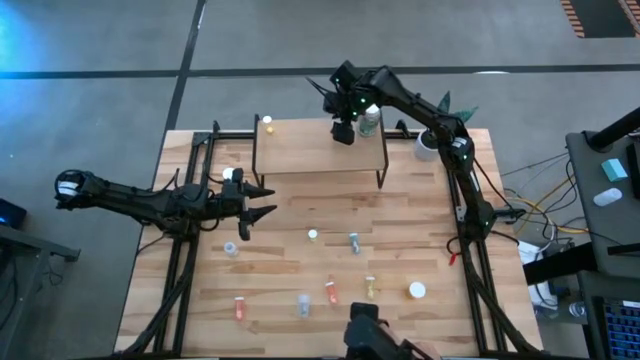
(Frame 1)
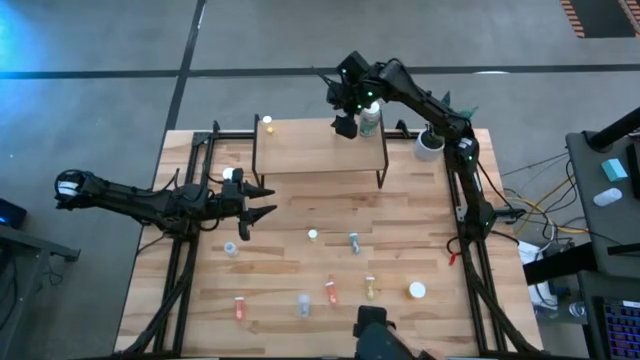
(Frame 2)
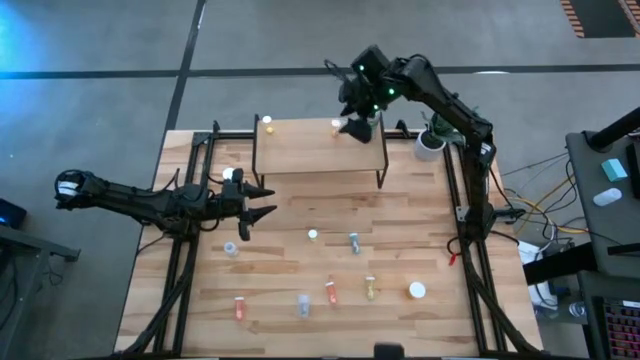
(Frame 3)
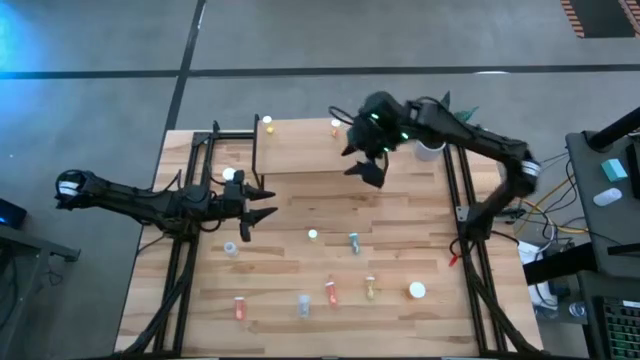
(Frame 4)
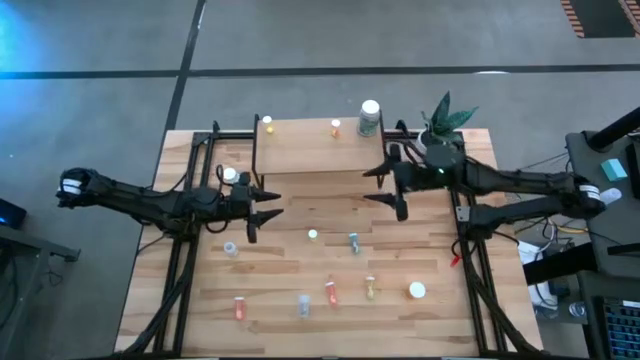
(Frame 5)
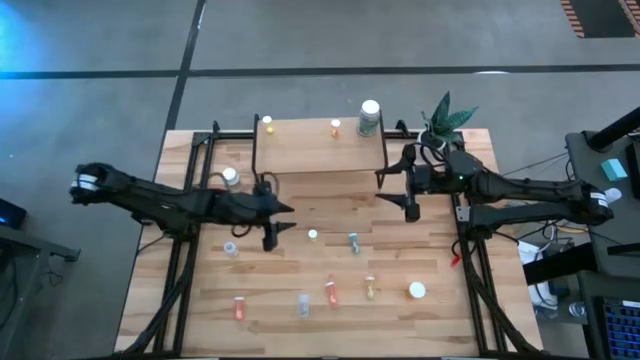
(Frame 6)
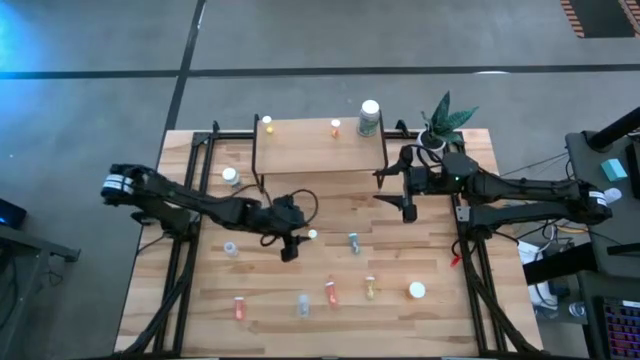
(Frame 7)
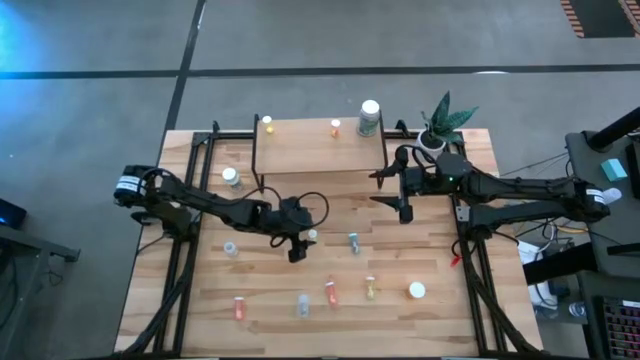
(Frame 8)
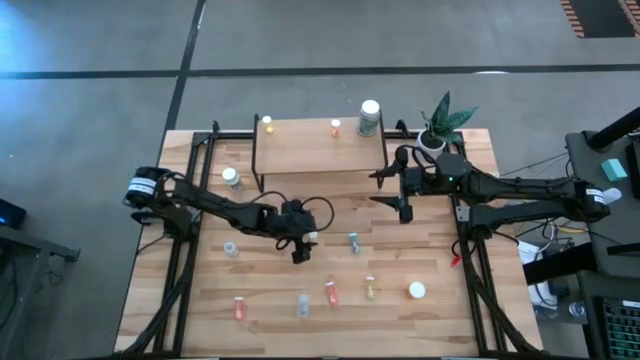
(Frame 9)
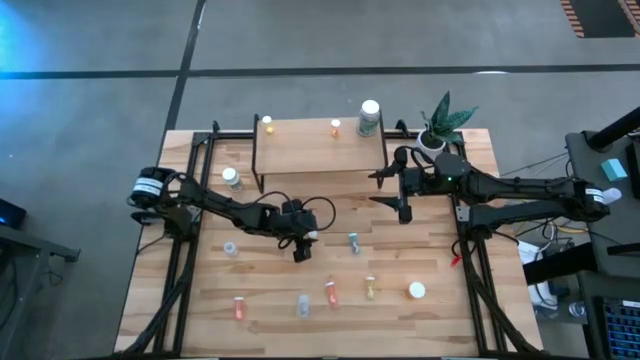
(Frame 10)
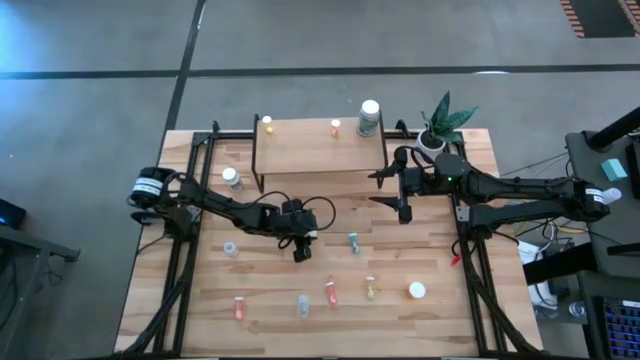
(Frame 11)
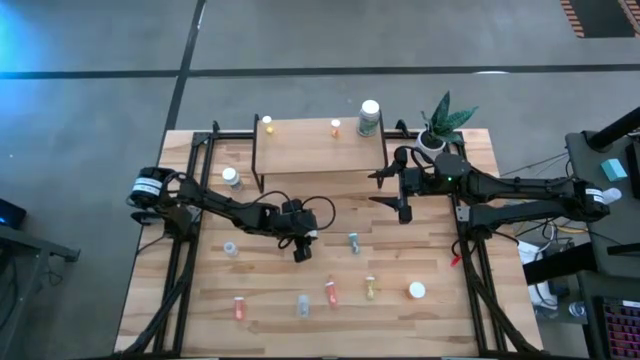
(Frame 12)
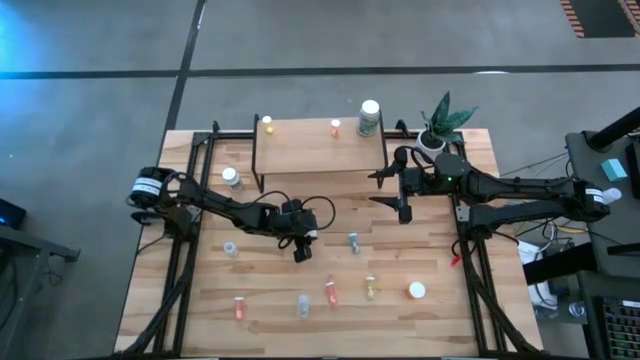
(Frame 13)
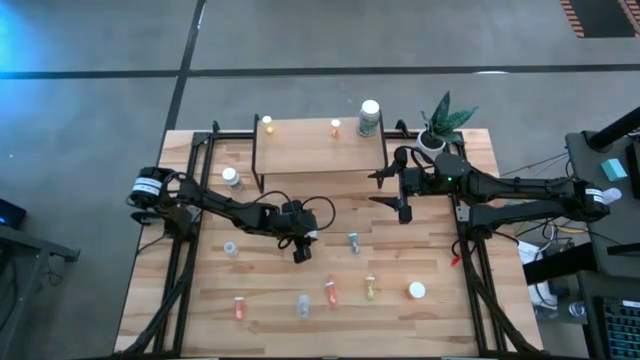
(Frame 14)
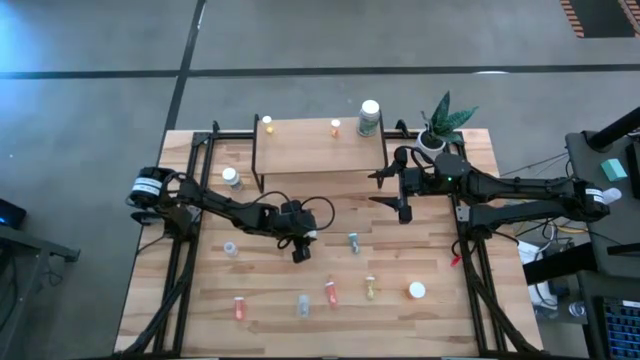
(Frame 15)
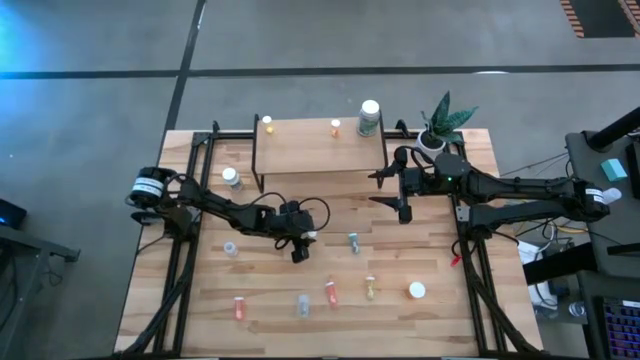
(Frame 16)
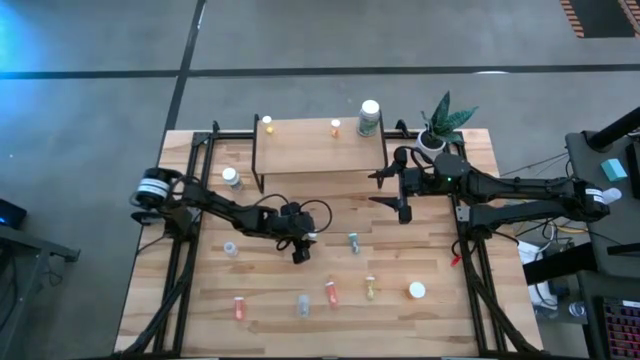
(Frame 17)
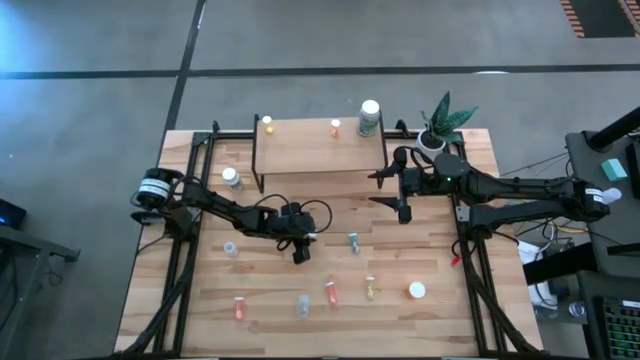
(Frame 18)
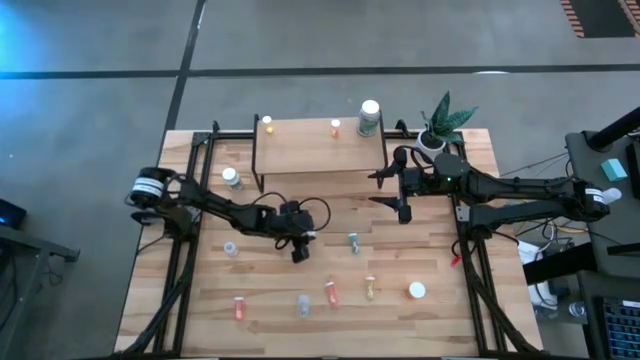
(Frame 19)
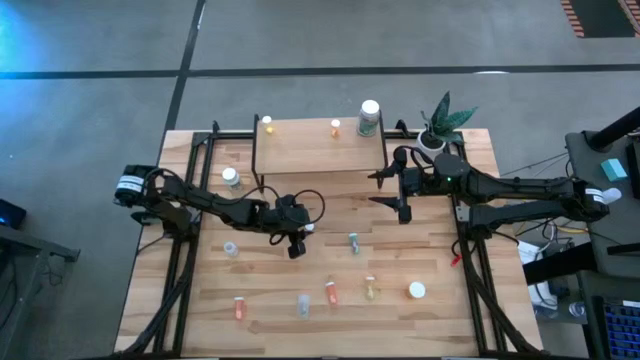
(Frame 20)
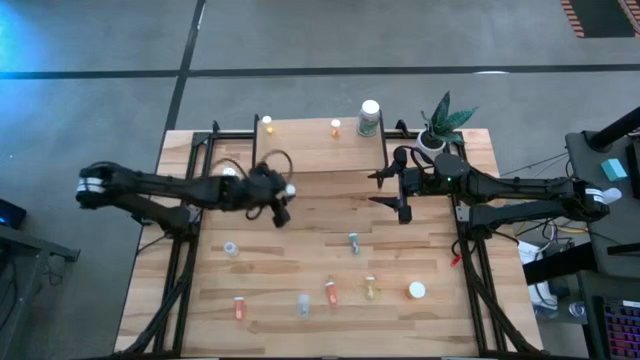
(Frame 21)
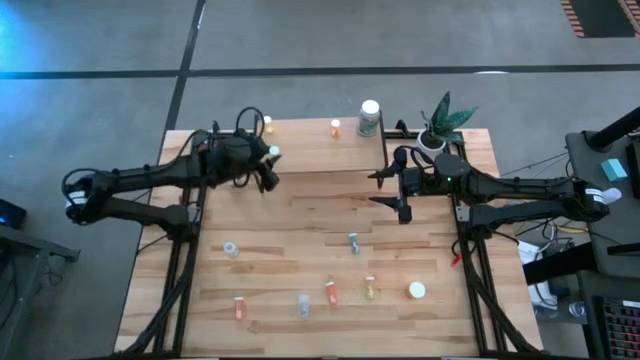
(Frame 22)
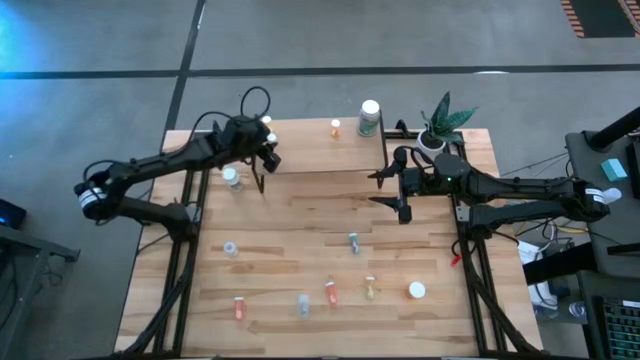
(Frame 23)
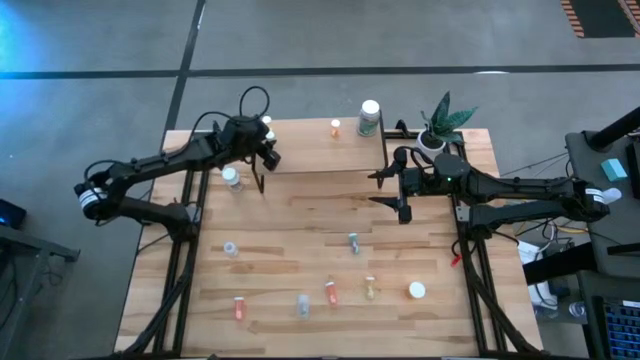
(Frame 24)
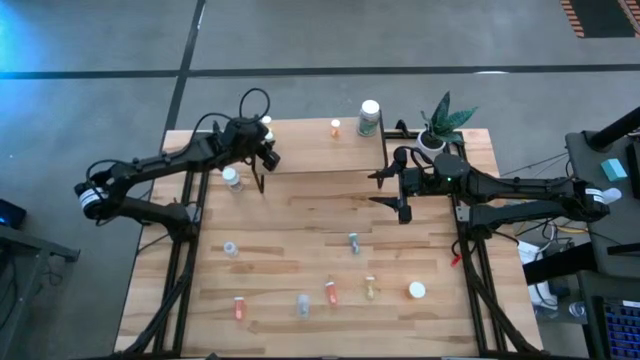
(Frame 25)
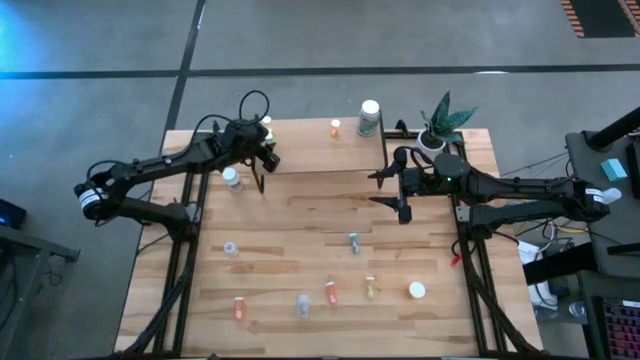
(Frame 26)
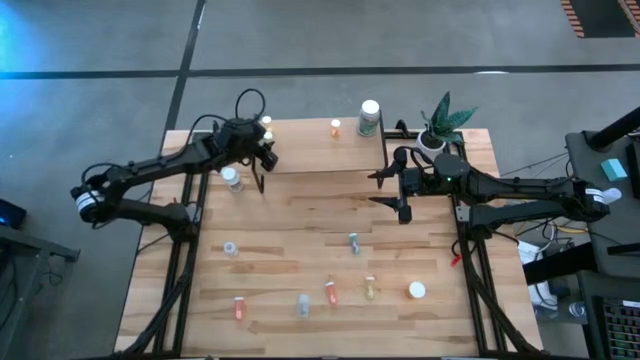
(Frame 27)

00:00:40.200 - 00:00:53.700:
Task: Pick and place medicine bottles onto shelf by color
Put the yellow pill bottle on the shelf

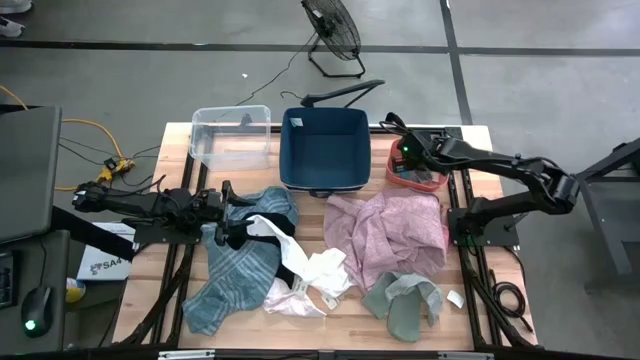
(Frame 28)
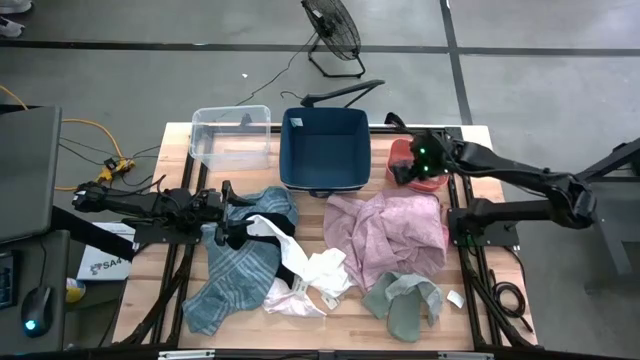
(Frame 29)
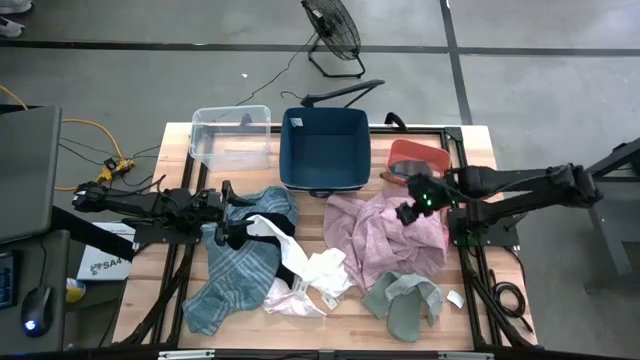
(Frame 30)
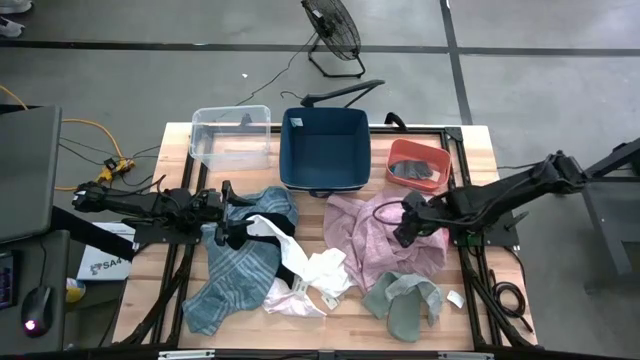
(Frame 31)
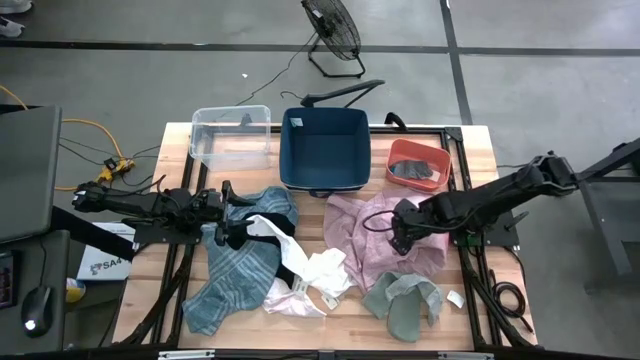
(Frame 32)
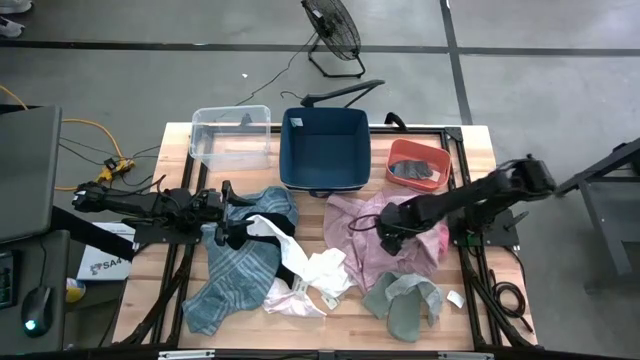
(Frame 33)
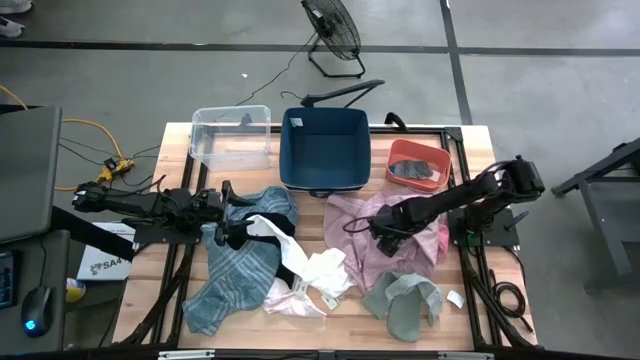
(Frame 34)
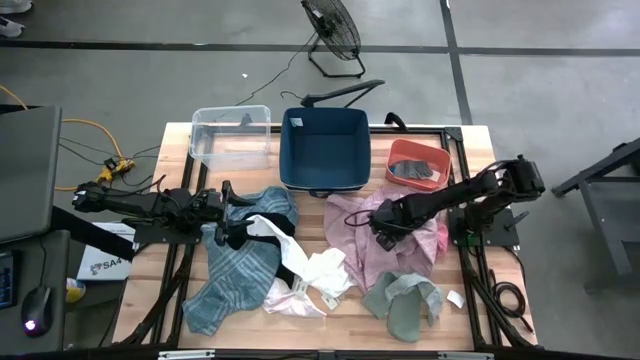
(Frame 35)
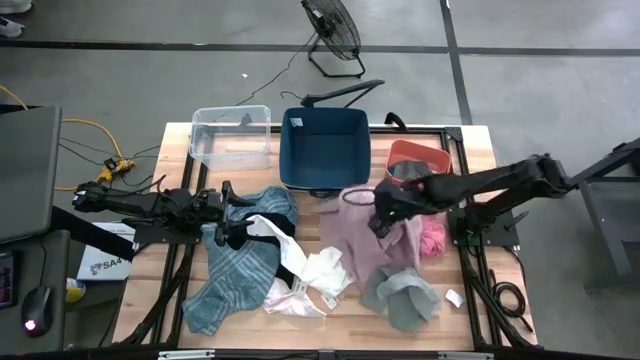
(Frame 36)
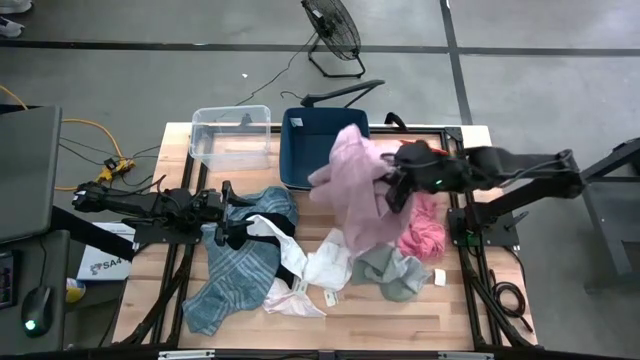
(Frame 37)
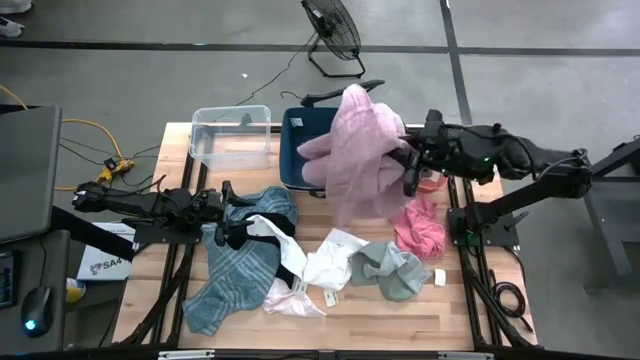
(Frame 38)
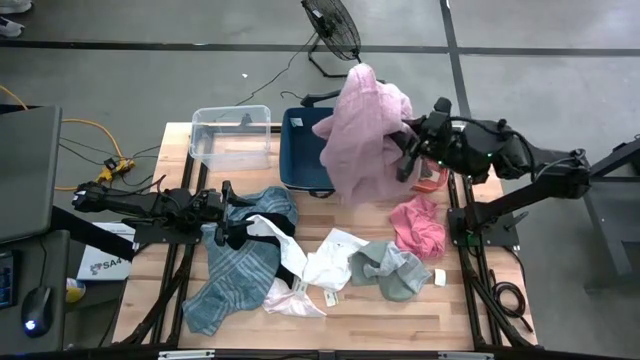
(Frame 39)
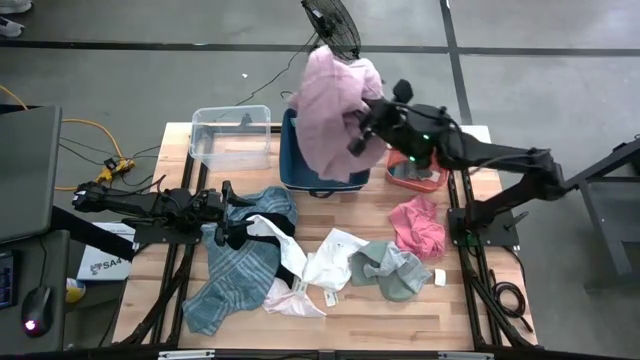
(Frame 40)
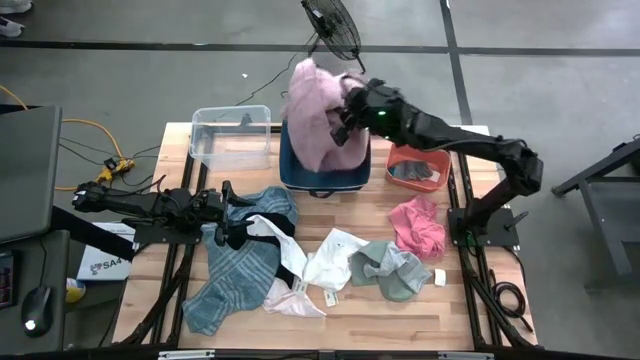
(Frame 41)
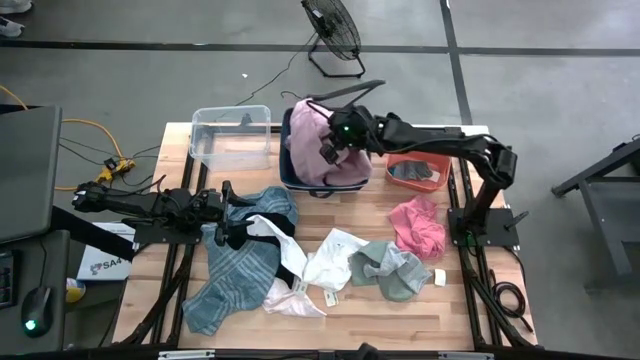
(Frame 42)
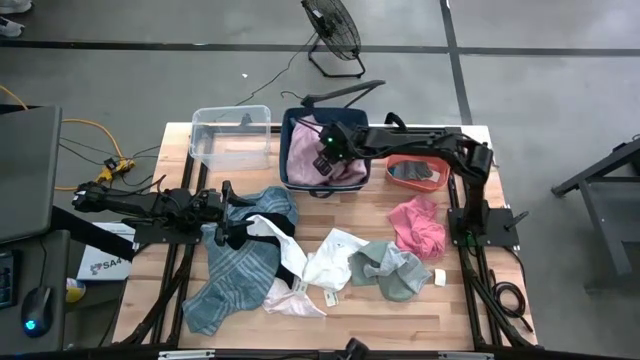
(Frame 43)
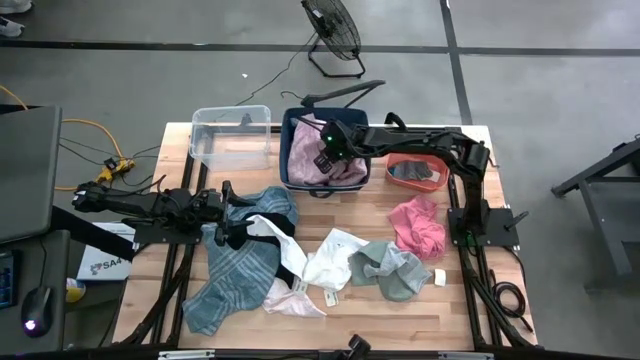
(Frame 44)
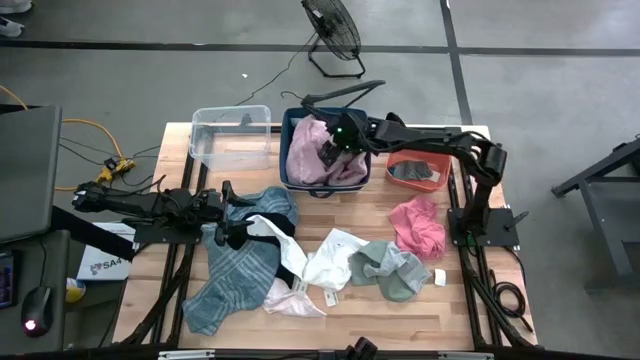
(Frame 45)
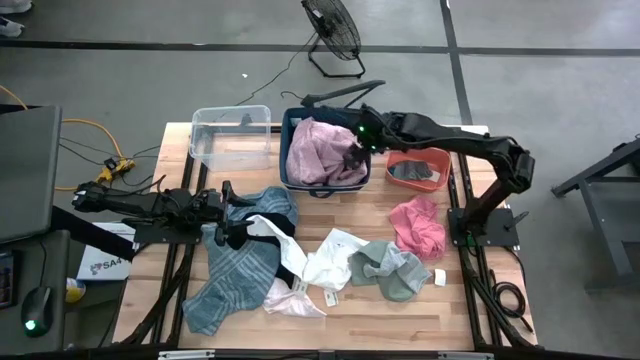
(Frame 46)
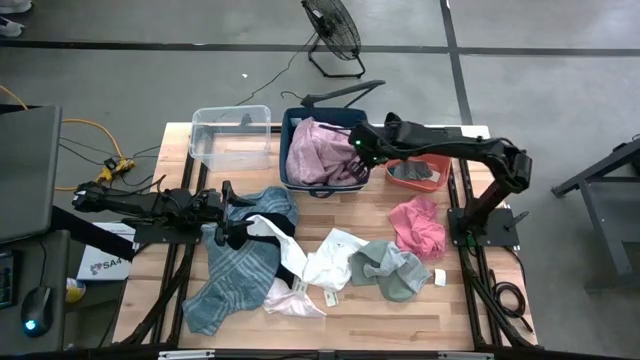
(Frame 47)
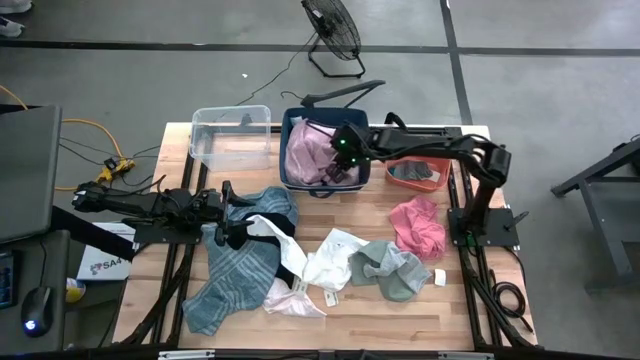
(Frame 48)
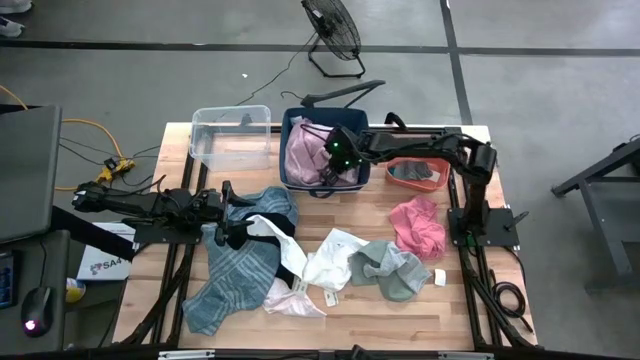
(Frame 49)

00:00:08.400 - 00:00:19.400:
Task: Pick & Place Cloths
Put the pink shirt into the blue bin
